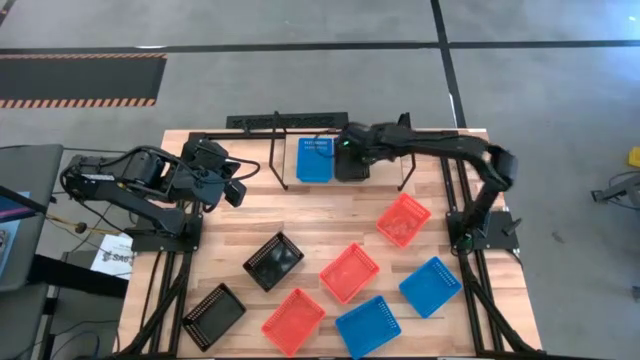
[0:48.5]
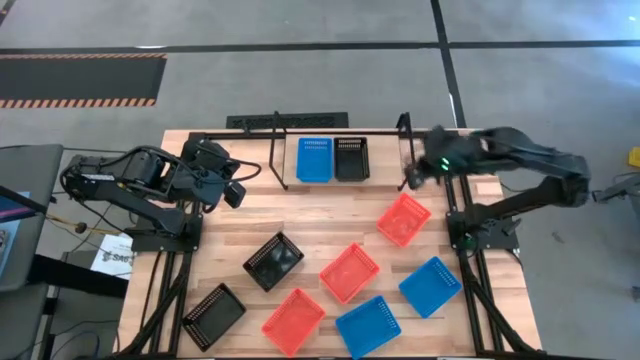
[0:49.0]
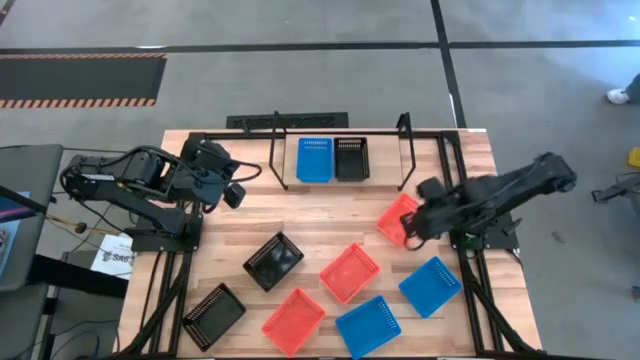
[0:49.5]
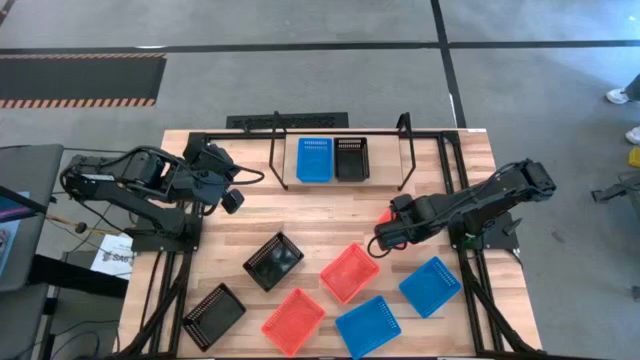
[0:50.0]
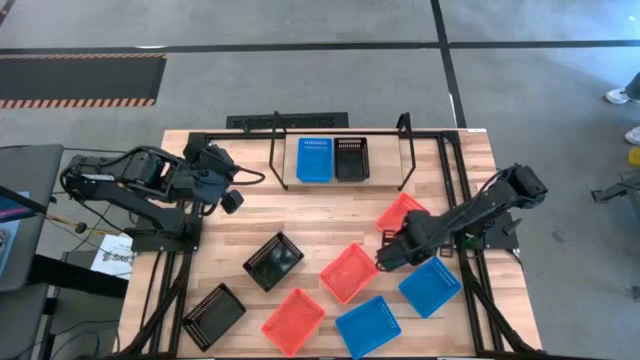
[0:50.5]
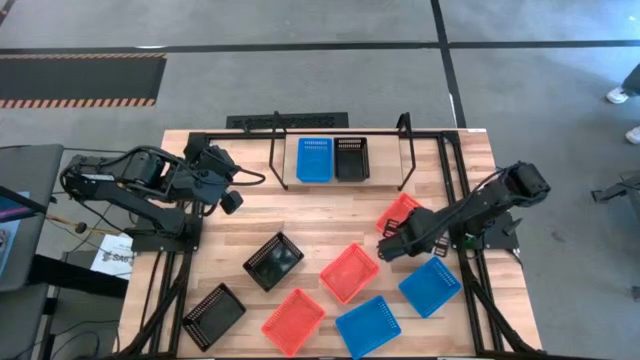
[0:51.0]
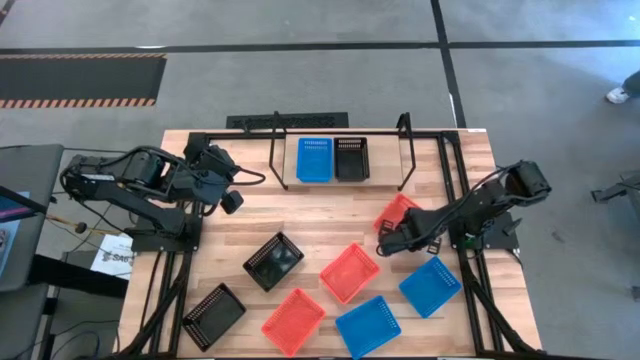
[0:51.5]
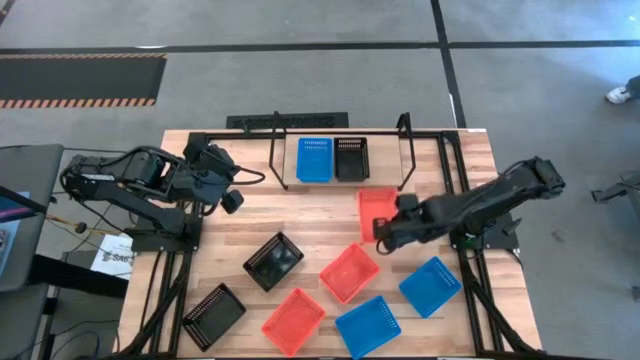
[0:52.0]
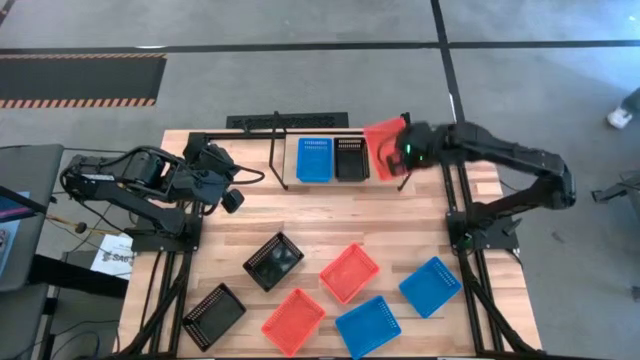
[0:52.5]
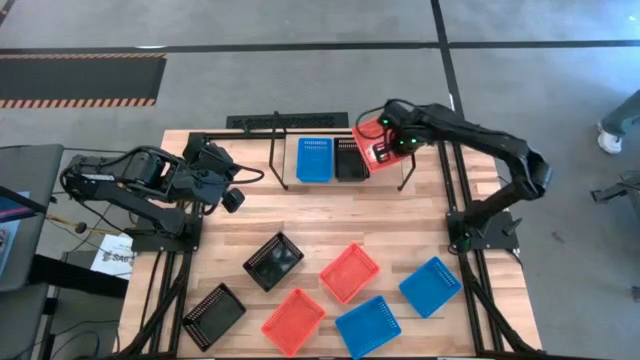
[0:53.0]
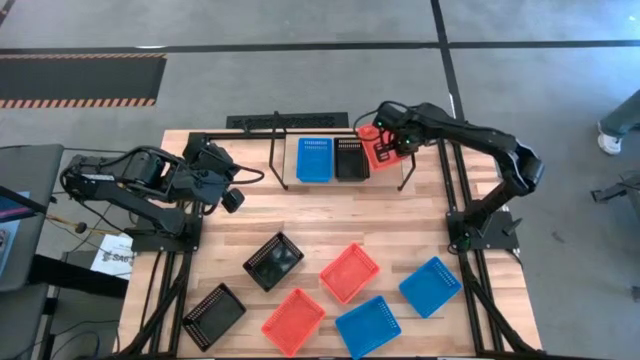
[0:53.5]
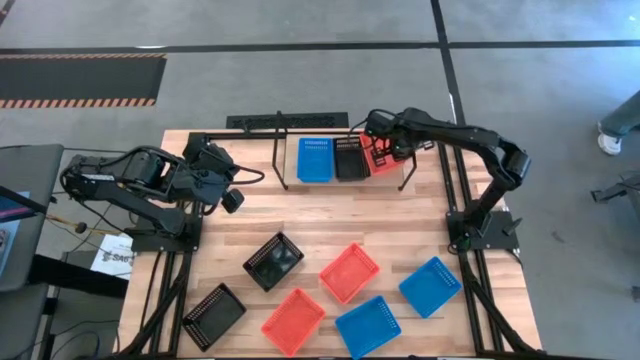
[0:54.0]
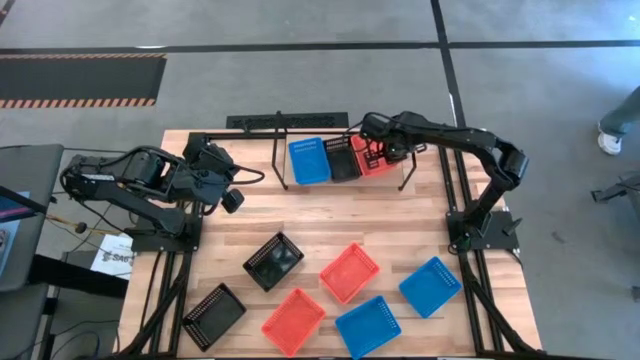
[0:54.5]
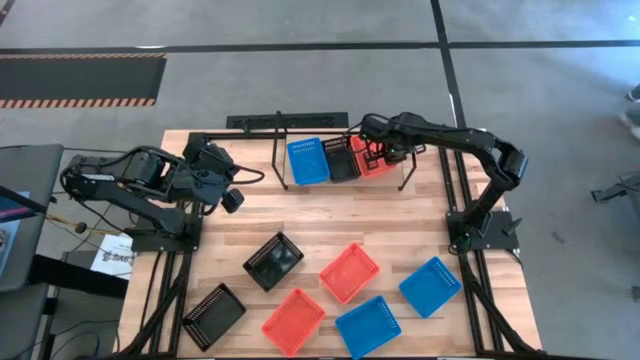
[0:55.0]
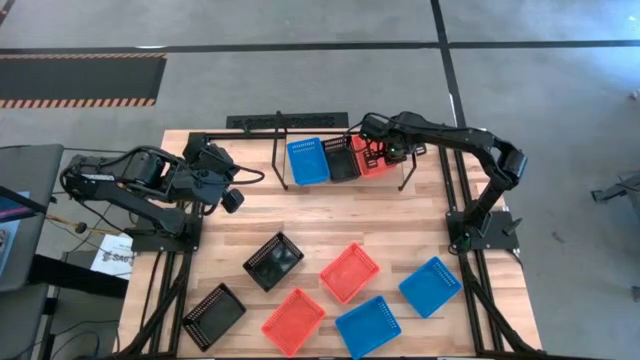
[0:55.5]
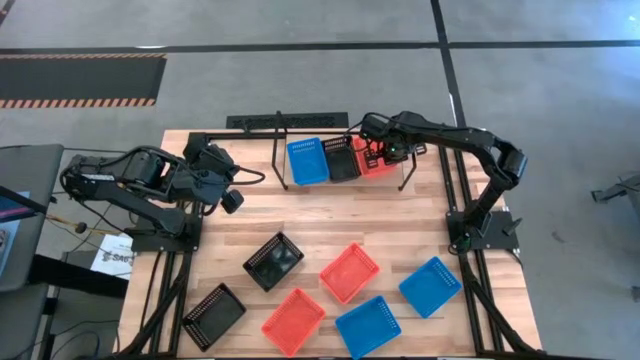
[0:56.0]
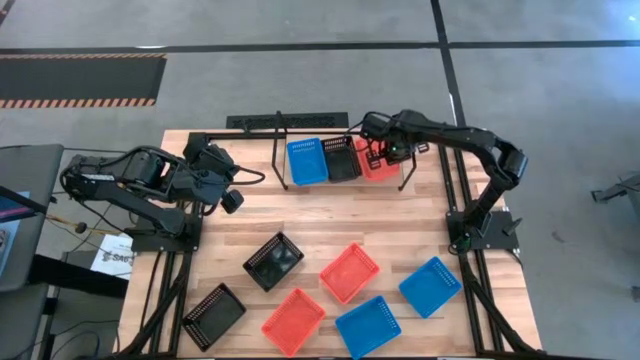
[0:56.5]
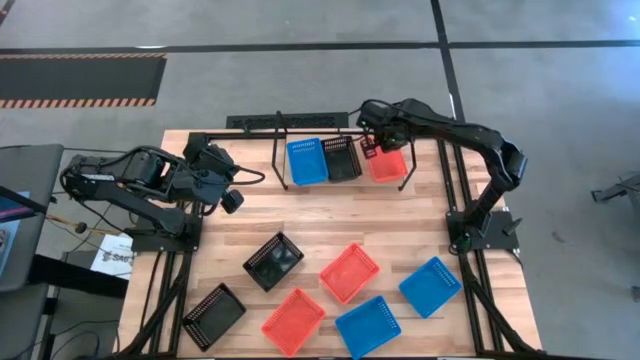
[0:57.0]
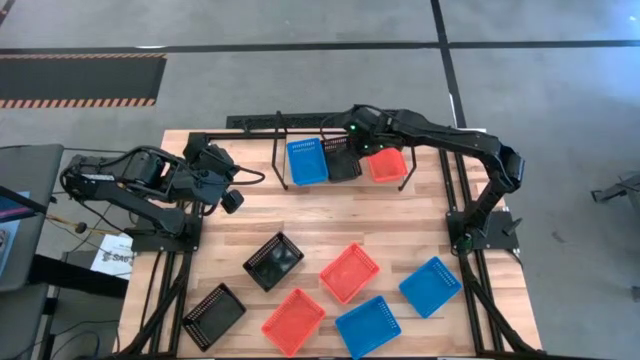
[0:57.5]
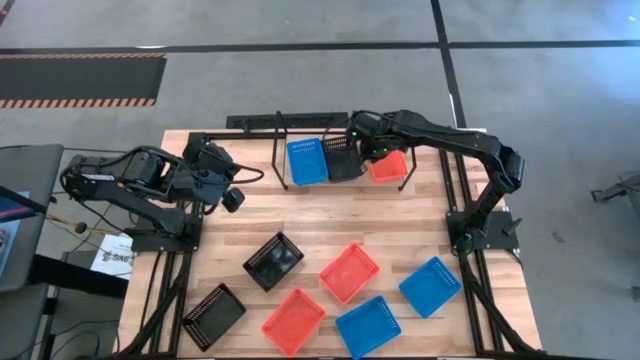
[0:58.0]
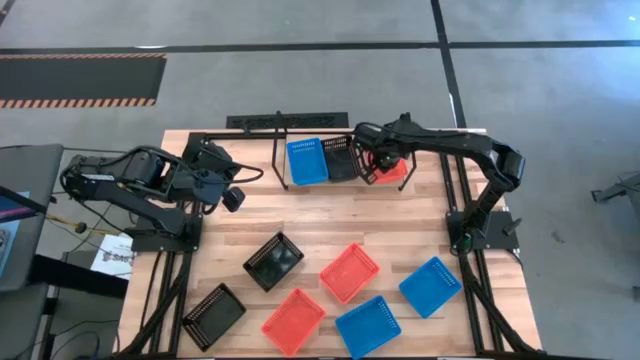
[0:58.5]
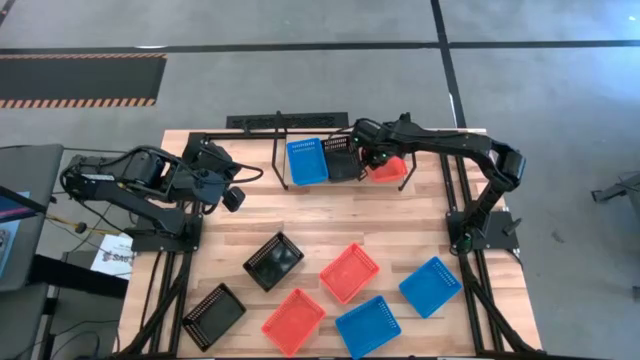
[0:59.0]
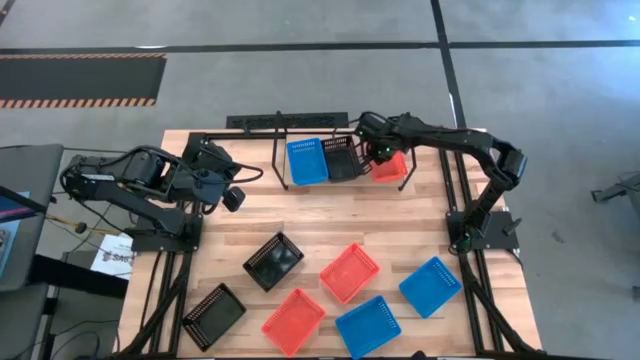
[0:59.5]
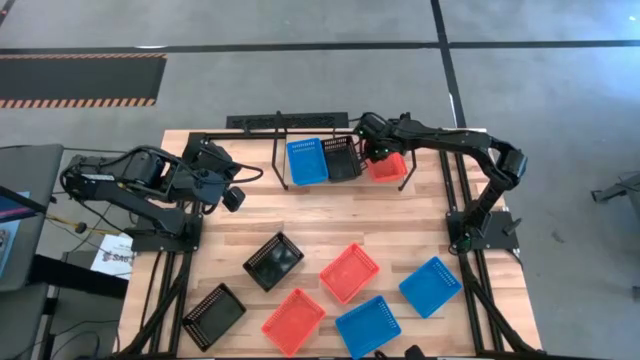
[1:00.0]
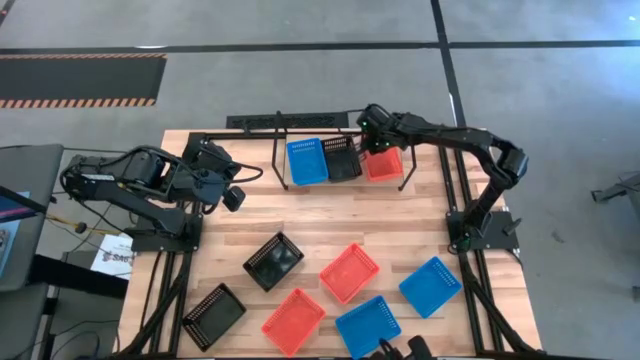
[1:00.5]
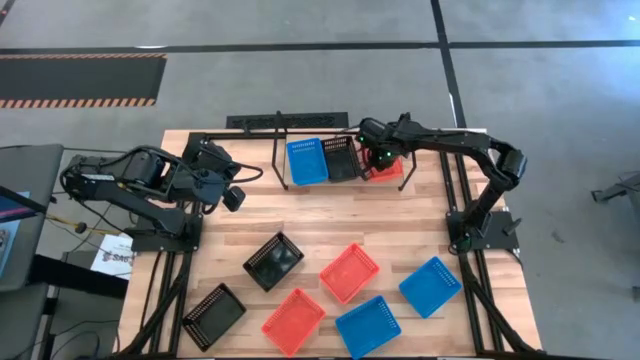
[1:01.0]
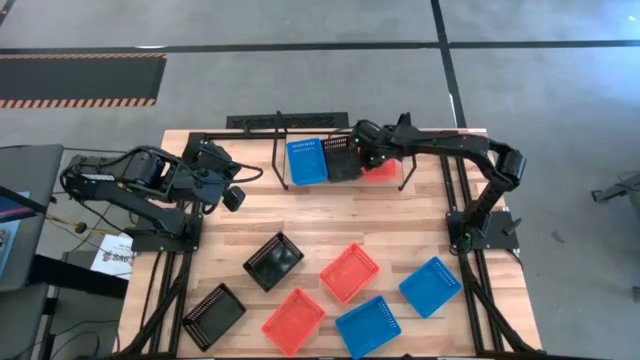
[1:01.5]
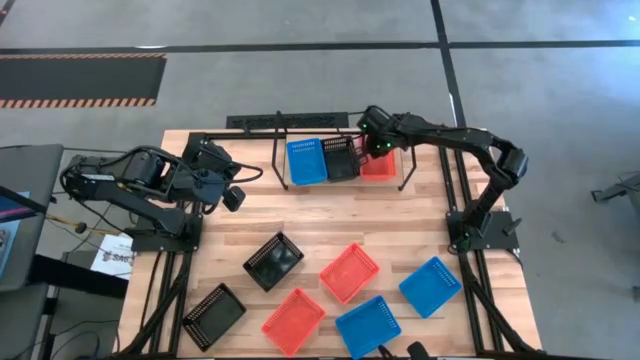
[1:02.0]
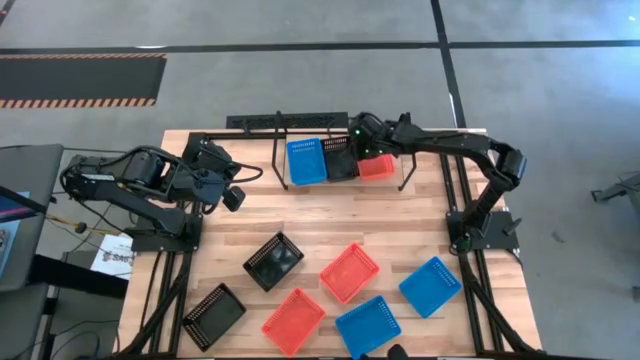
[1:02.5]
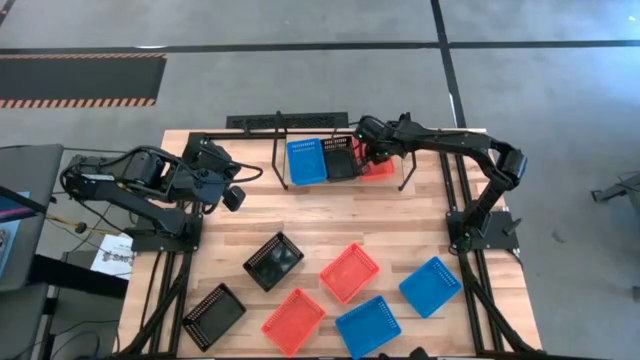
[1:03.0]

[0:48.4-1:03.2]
Task: Stack baskets on shelf by color
Put the top orange bin on the shelf

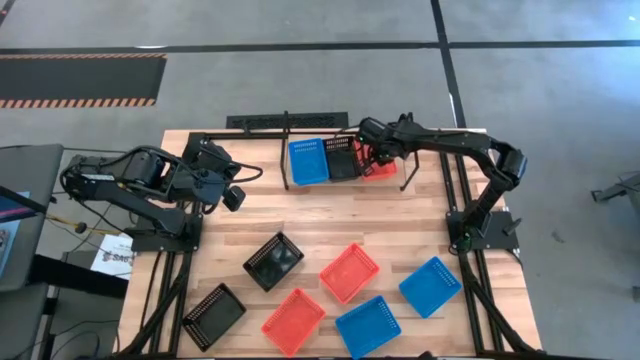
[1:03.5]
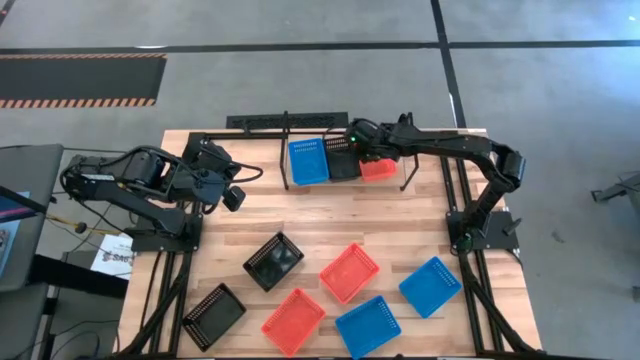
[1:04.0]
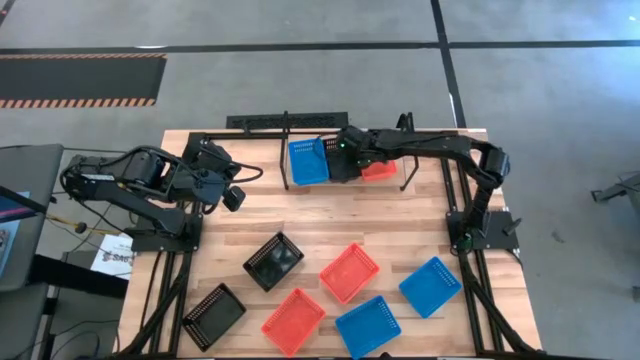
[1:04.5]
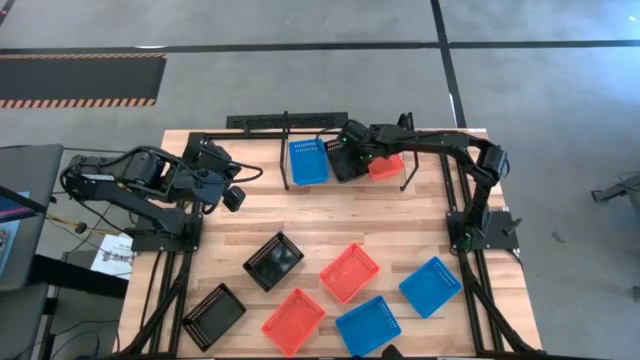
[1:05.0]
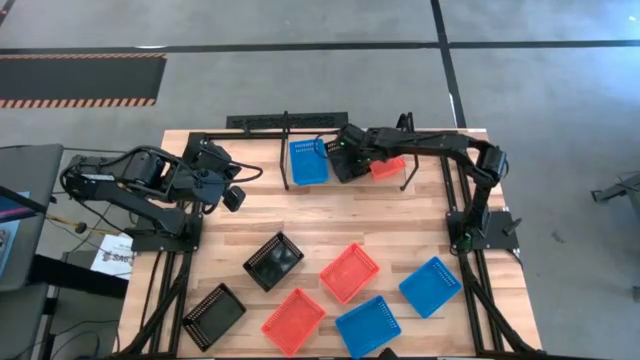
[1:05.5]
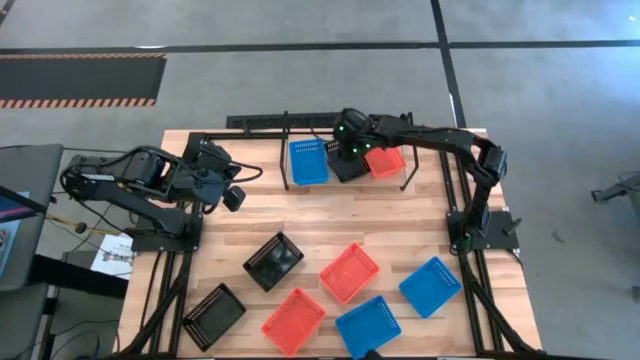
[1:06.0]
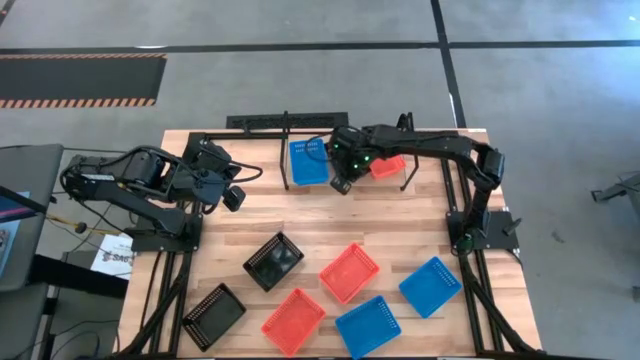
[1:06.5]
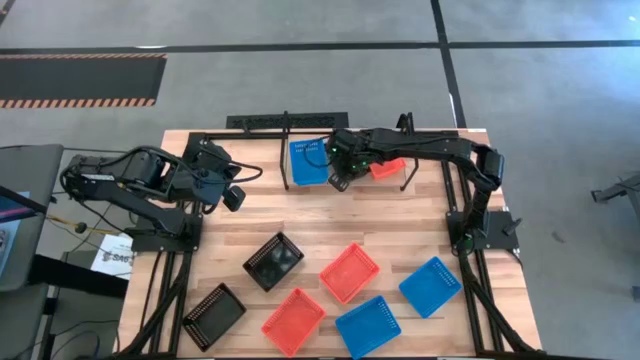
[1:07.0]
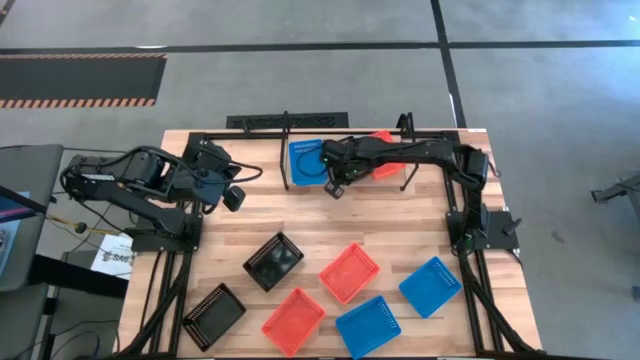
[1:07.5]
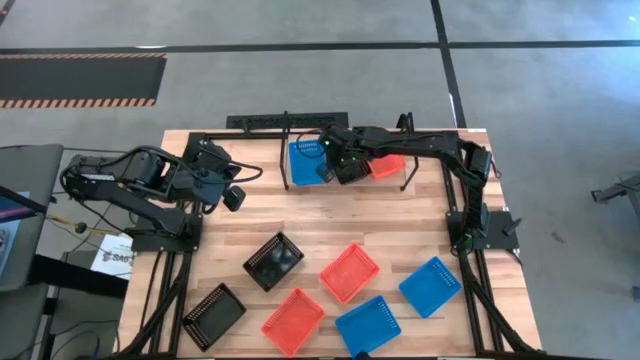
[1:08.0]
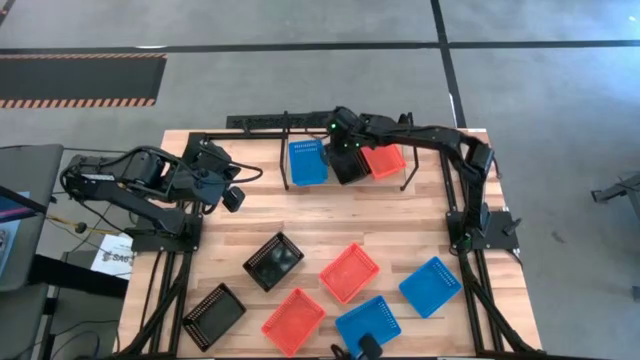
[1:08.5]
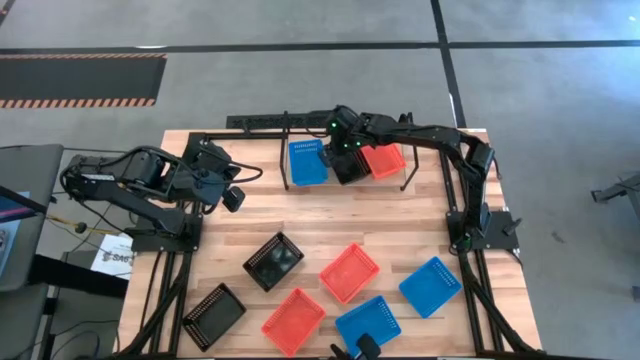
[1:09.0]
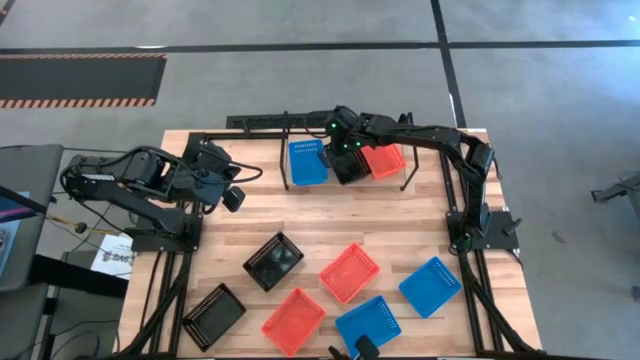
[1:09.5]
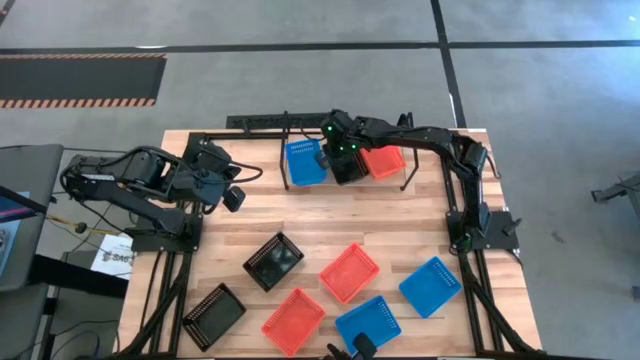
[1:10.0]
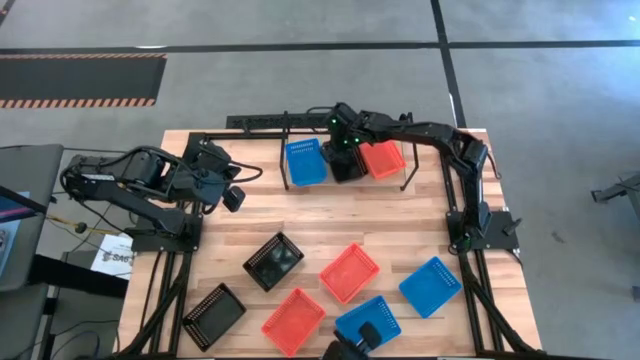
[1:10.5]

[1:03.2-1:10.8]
Adjust the black bin on the shelf
